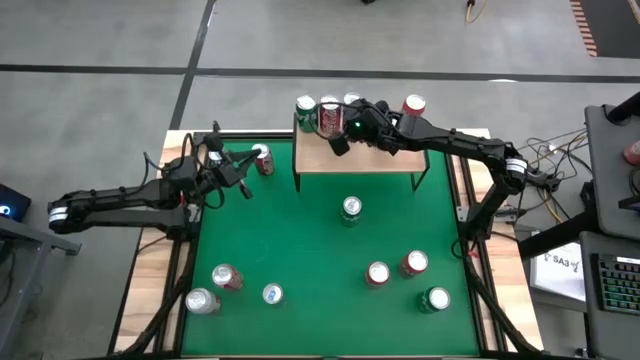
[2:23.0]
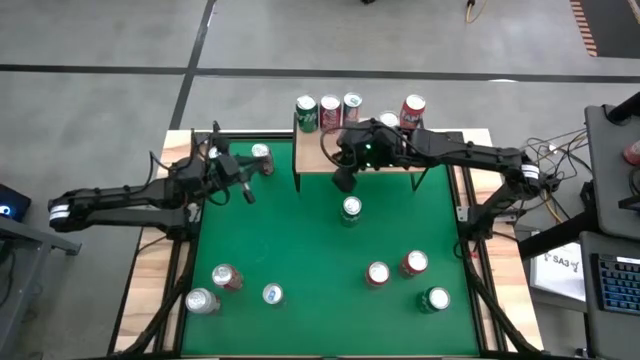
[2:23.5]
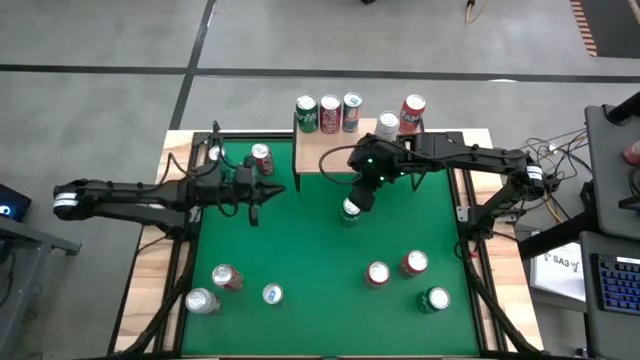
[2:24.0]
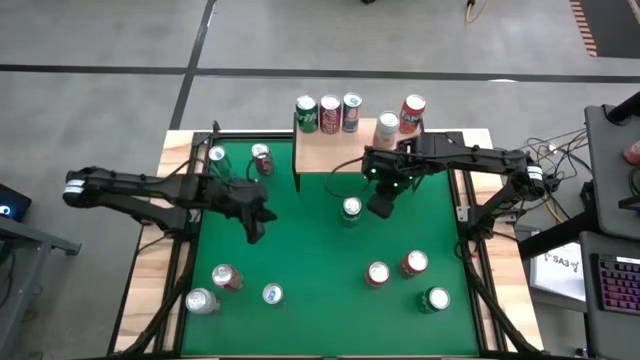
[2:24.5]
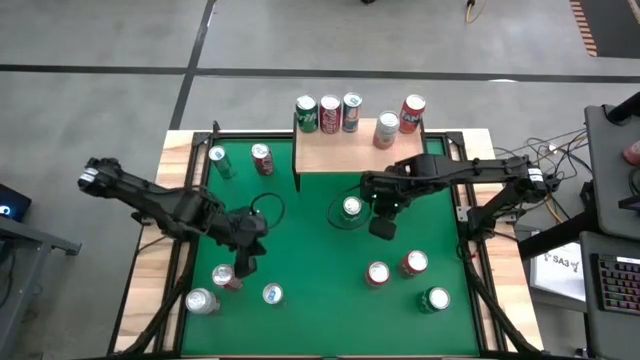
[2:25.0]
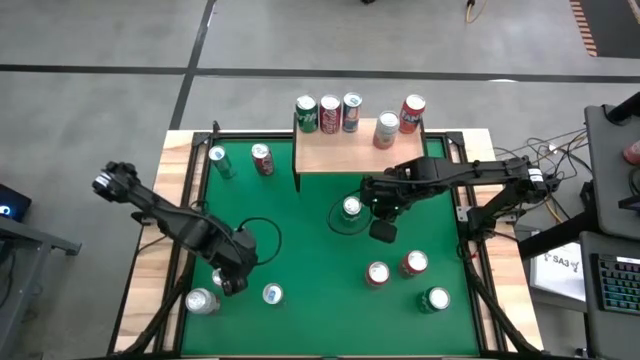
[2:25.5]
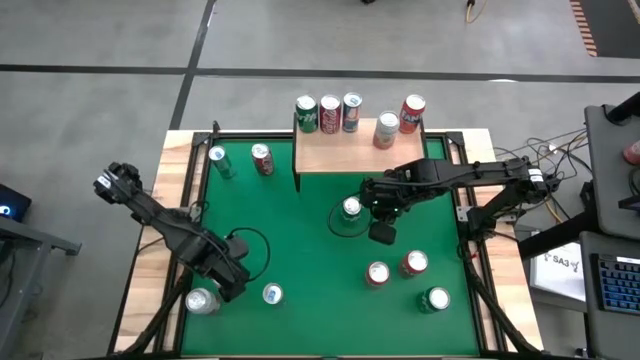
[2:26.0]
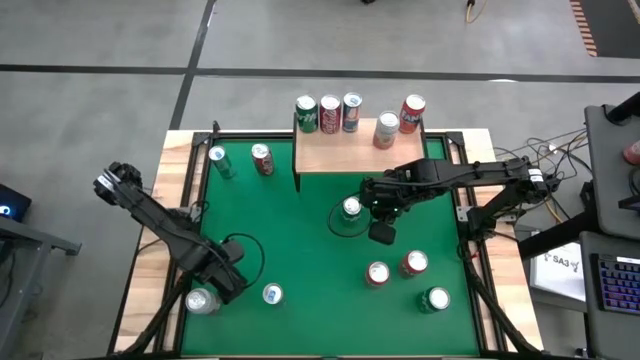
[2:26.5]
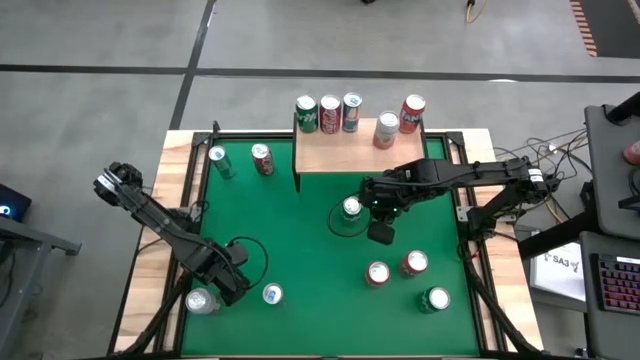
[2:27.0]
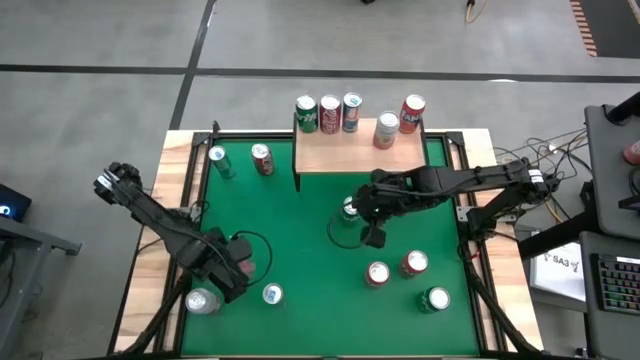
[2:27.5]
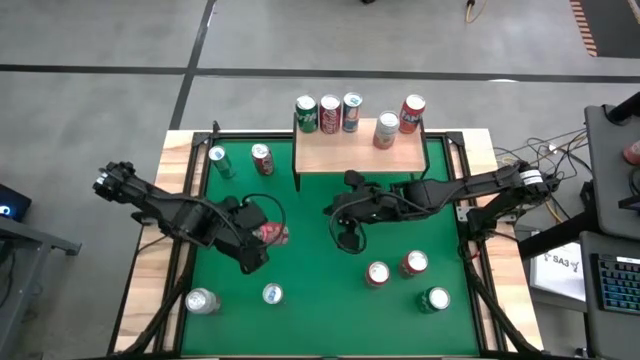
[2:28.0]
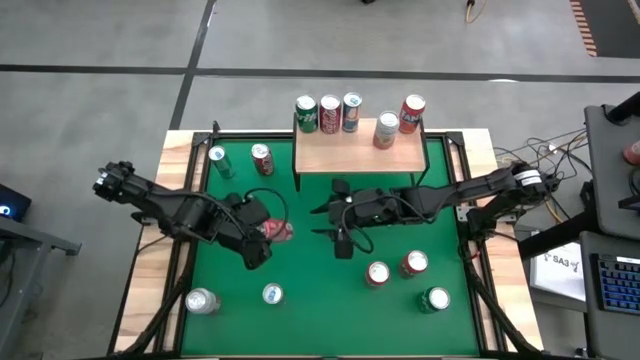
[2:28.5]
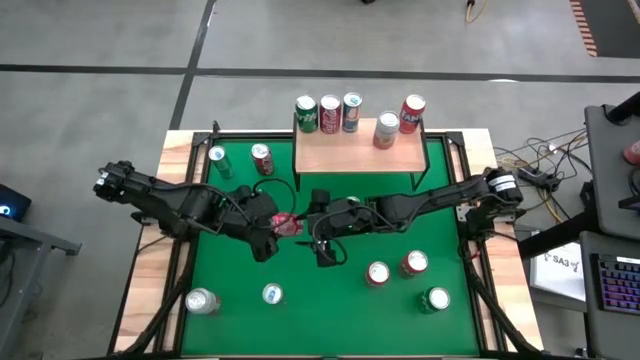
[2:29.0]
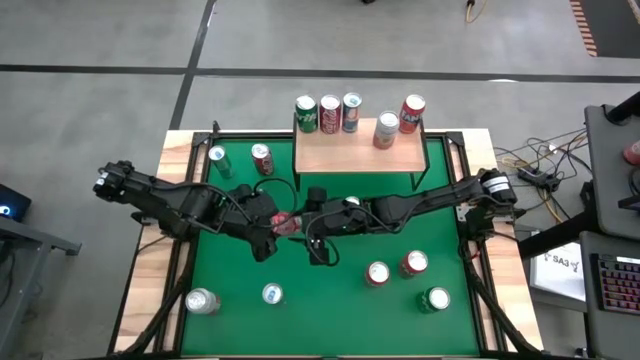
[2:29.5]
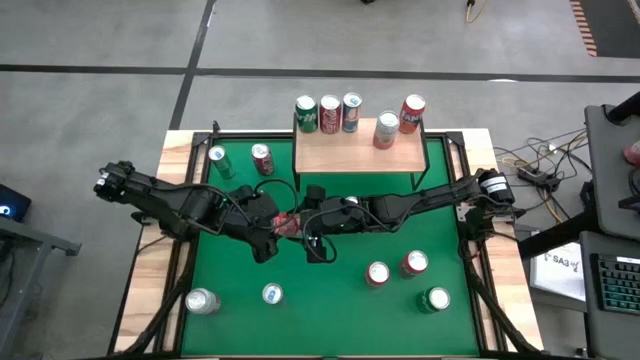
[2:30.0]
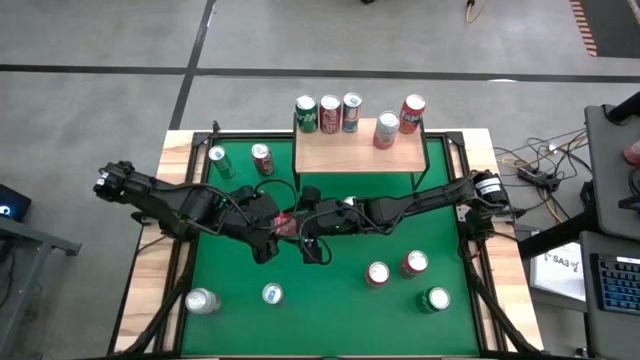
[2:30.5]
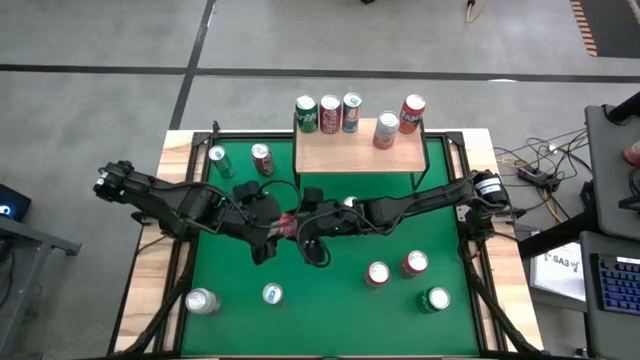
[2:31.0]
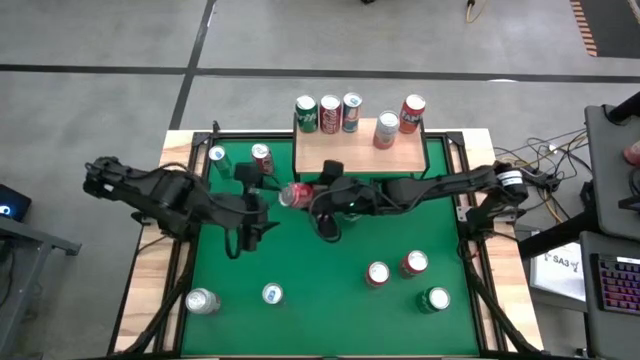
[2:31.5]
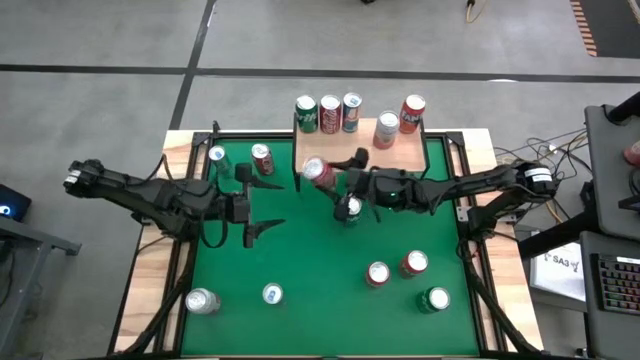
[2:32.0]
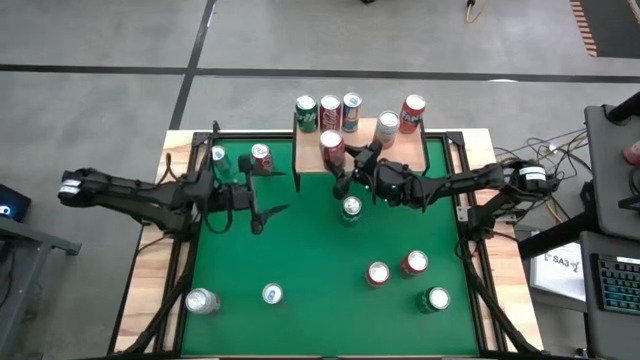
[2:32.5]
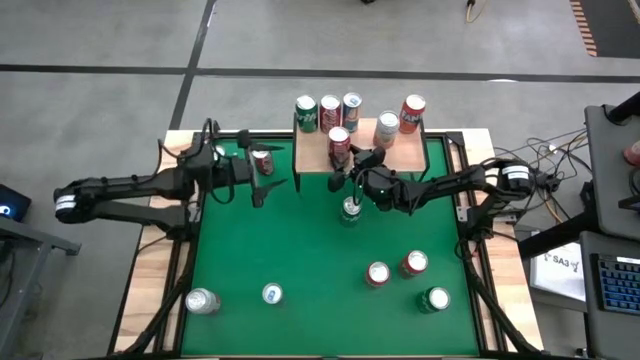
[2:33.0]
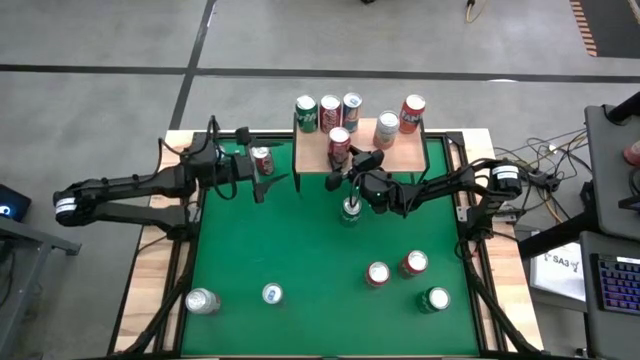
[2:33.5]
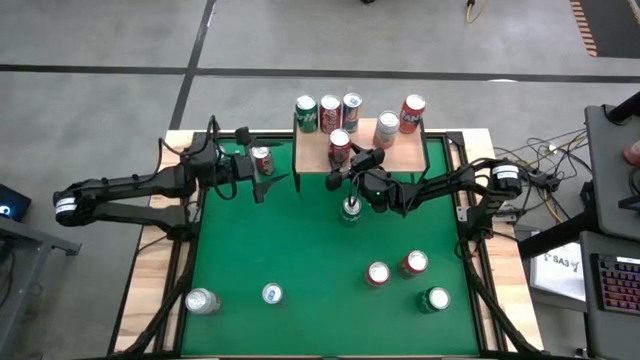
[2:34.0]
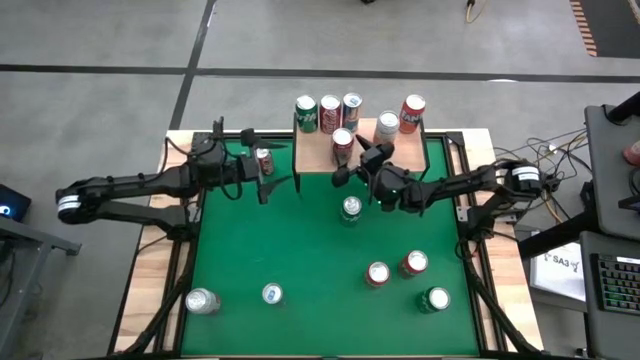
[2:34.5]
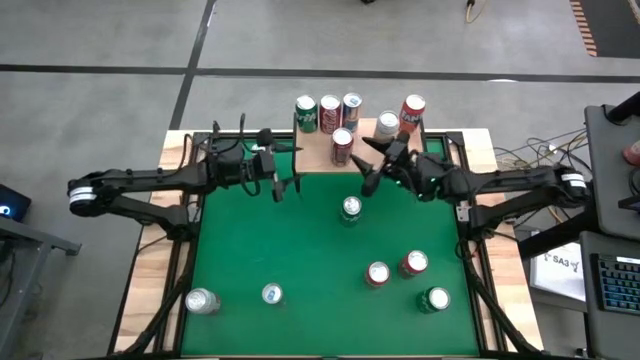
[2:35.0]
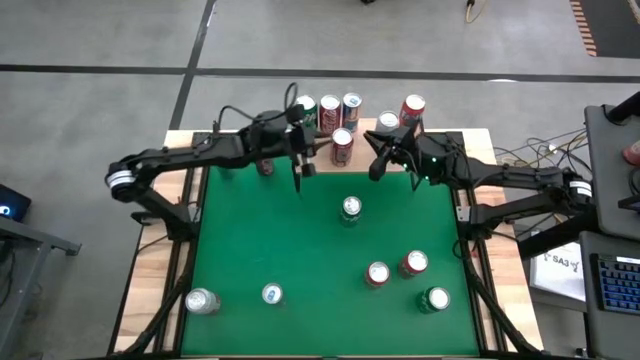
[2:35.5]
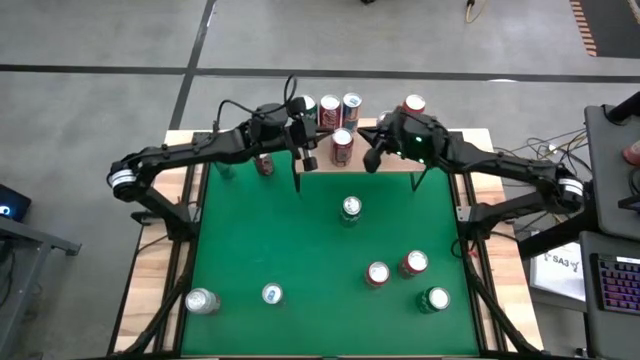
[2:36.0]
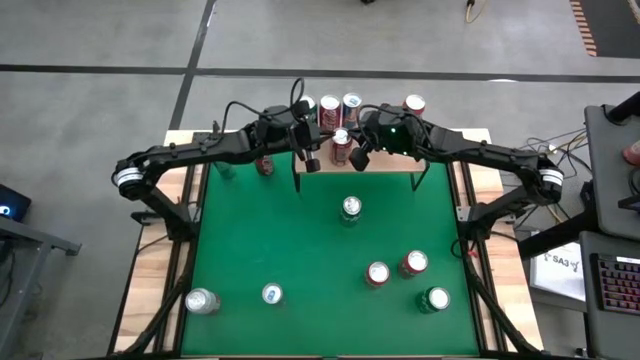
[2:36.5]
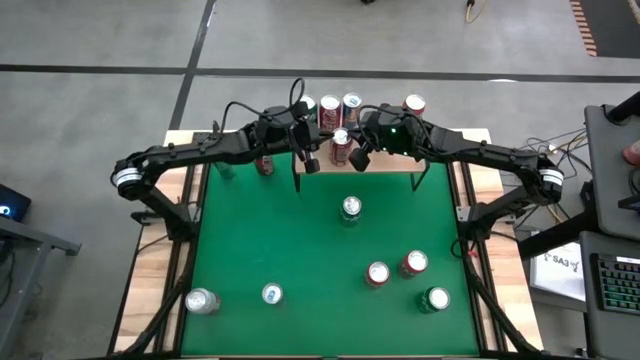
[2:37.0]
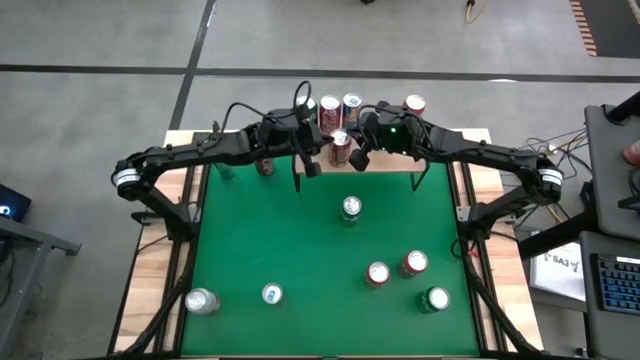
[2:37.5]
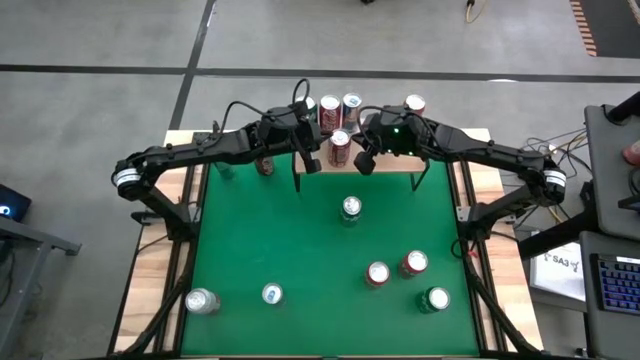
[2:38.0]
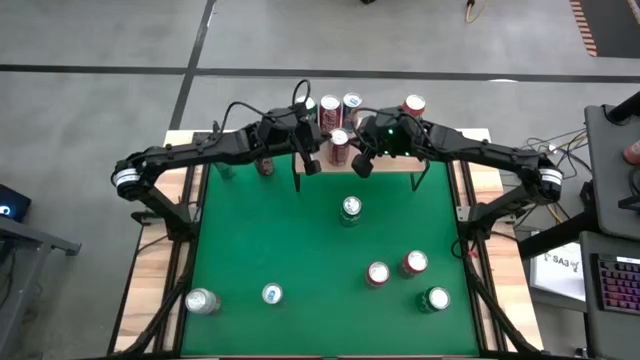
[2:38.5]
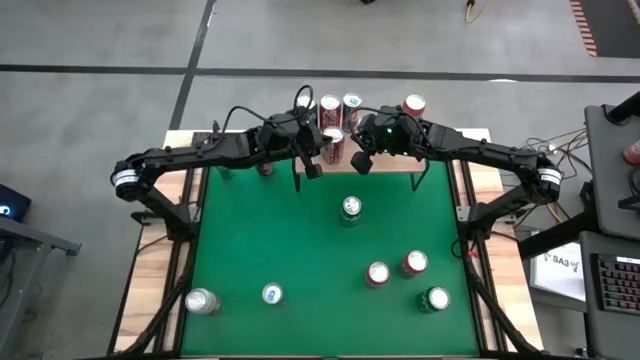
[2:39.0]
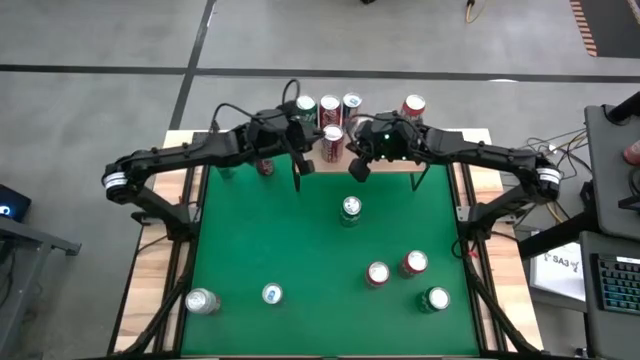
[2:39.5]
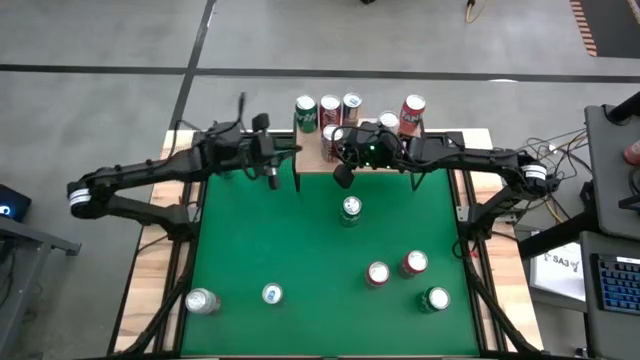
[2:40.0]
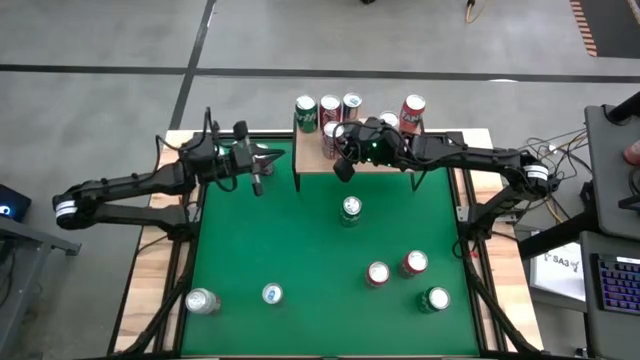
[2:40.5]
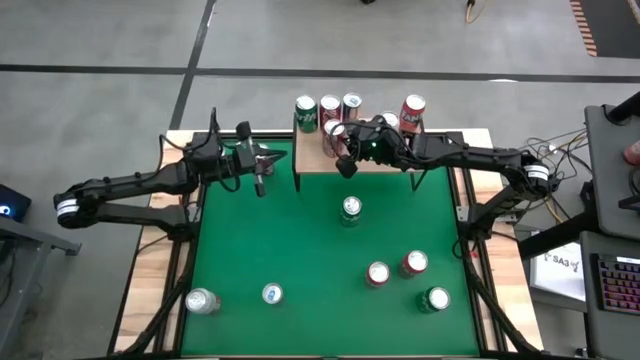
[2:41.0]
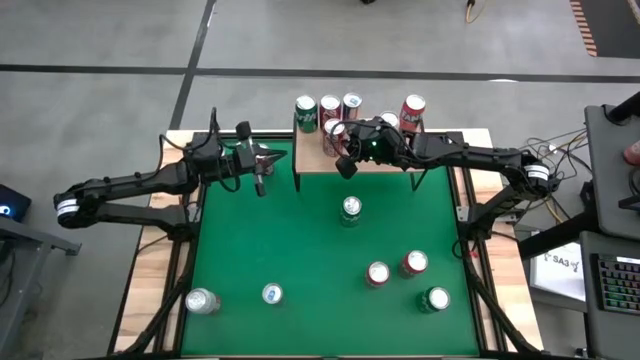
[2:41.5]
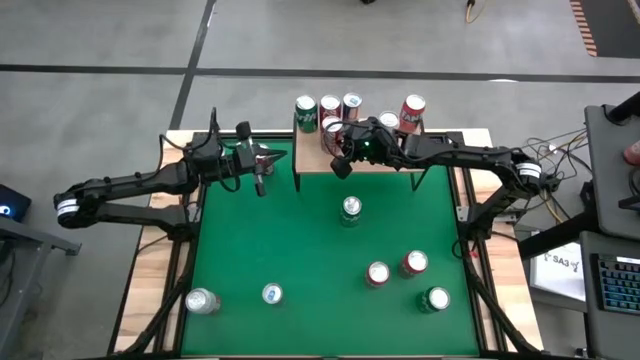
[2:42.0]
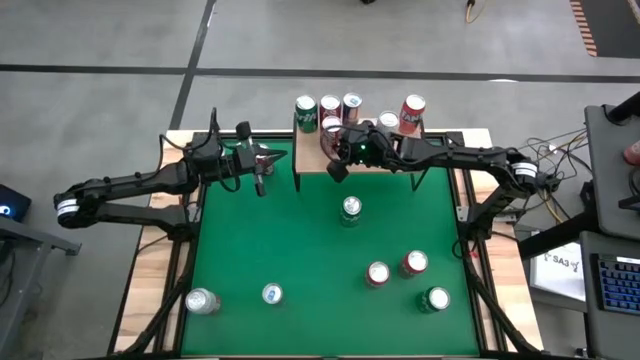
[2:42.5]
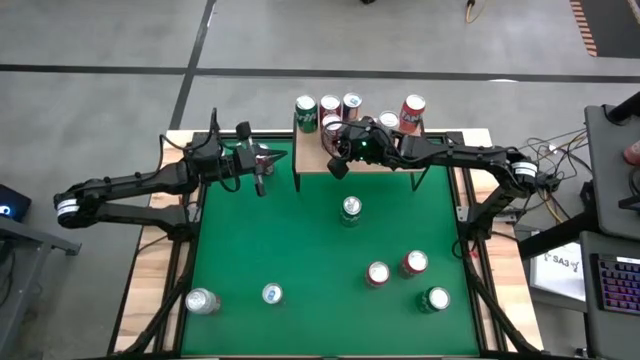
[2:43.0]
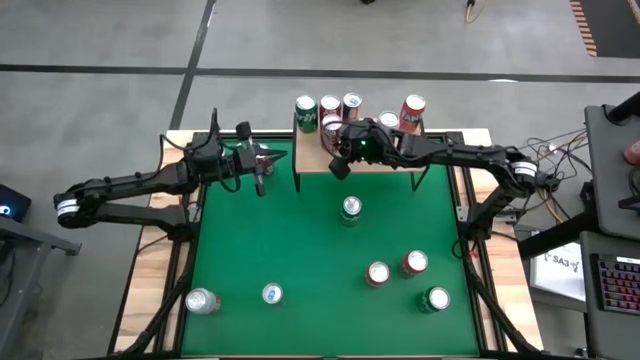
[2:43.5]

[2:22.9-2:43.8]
Task: Place canned beverage on shelf
Put the bottom red soda can aligned with the red soda can on the shelf
